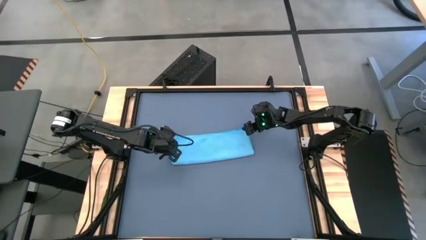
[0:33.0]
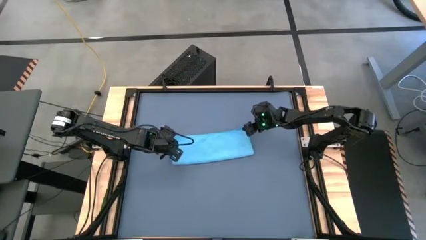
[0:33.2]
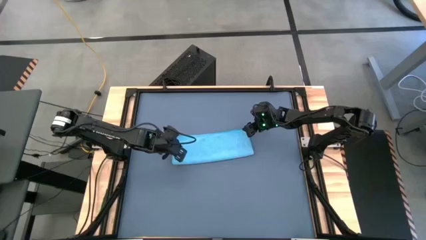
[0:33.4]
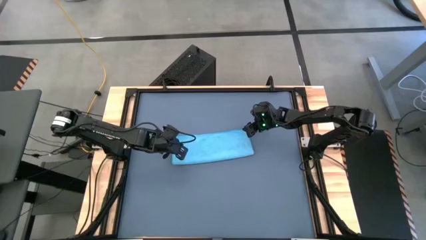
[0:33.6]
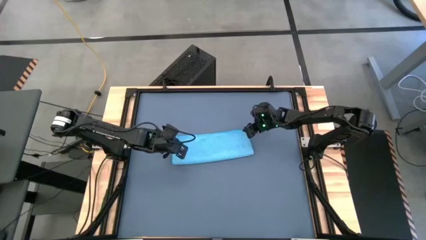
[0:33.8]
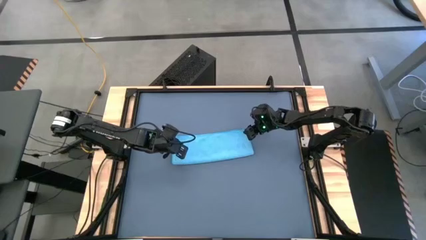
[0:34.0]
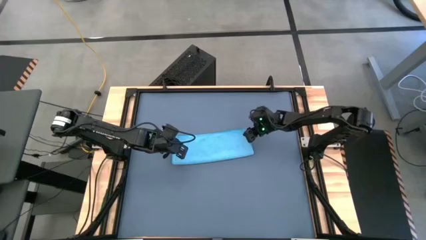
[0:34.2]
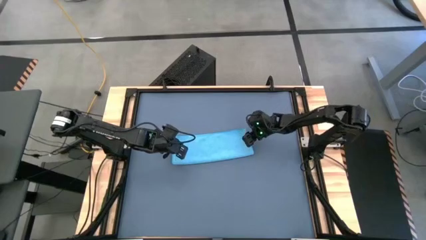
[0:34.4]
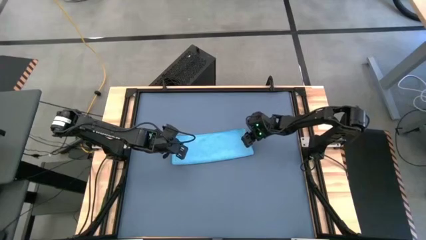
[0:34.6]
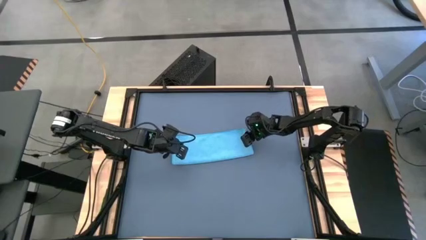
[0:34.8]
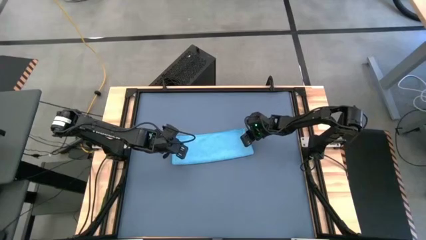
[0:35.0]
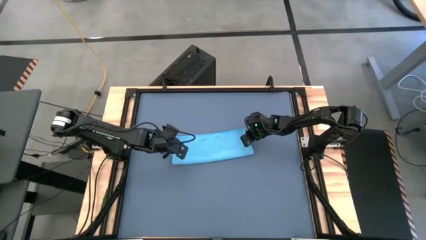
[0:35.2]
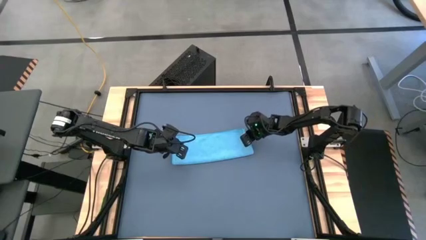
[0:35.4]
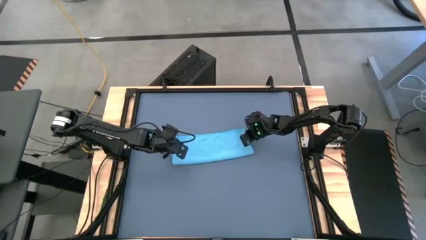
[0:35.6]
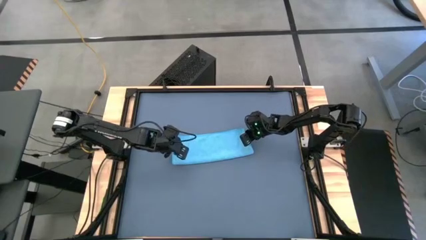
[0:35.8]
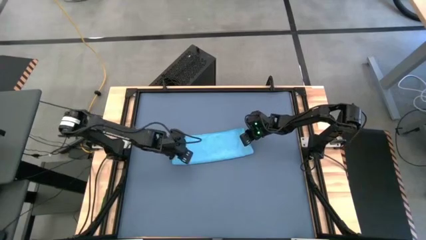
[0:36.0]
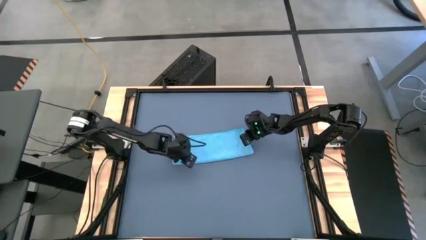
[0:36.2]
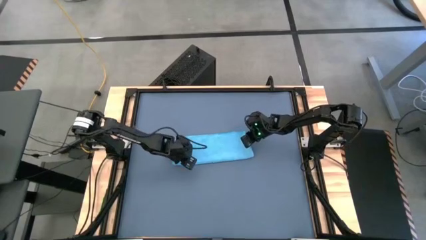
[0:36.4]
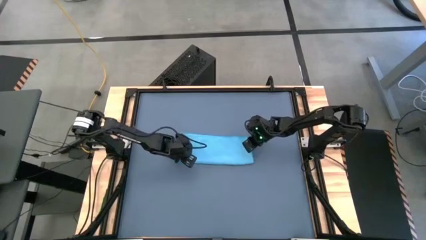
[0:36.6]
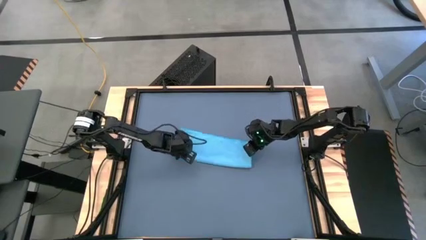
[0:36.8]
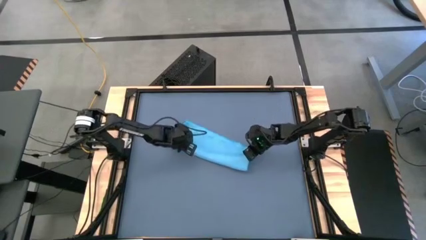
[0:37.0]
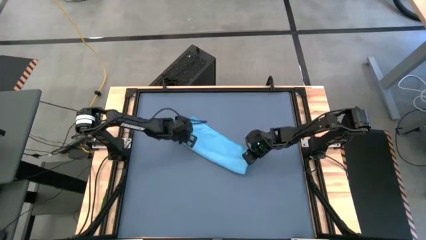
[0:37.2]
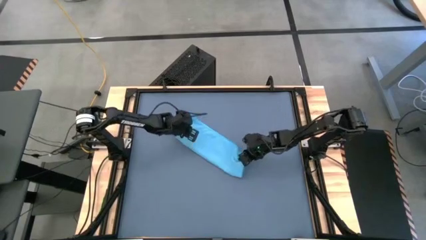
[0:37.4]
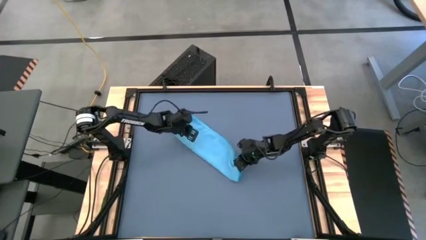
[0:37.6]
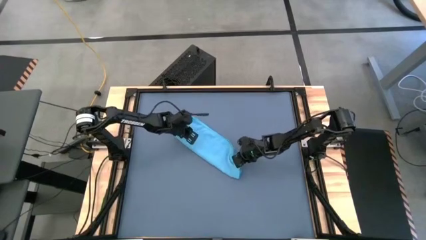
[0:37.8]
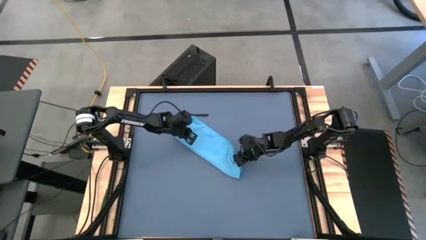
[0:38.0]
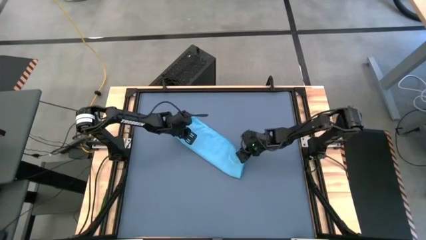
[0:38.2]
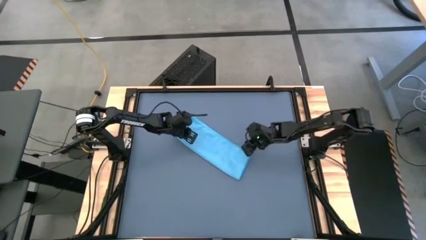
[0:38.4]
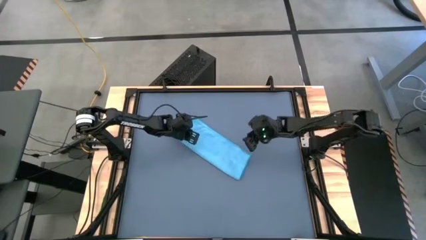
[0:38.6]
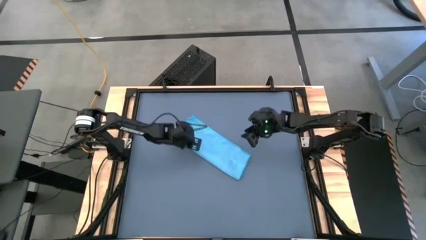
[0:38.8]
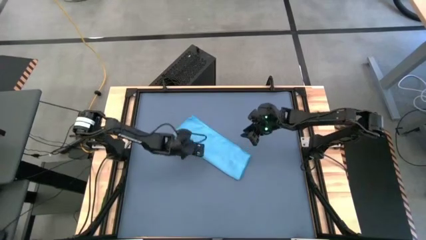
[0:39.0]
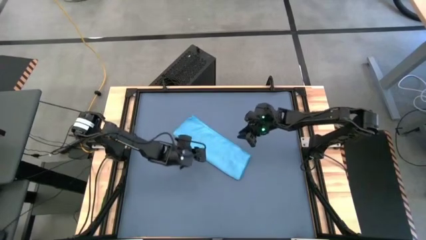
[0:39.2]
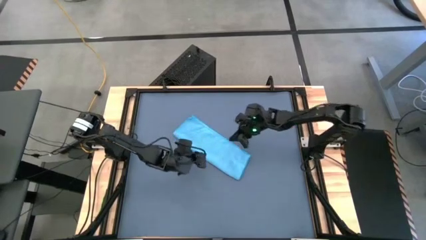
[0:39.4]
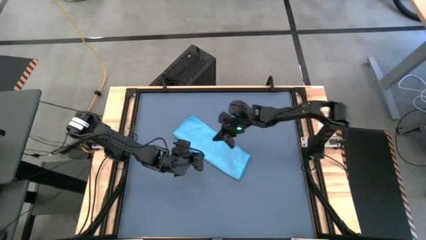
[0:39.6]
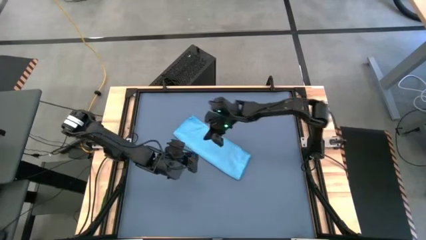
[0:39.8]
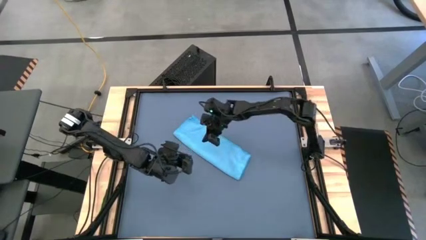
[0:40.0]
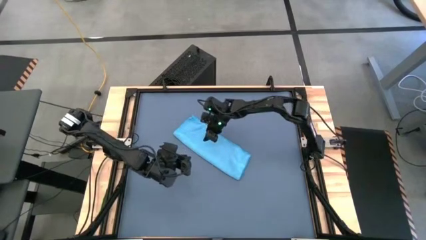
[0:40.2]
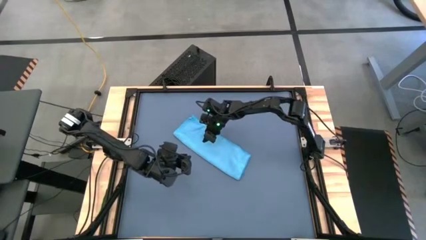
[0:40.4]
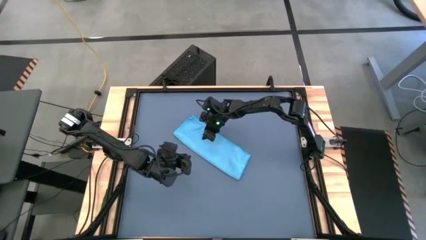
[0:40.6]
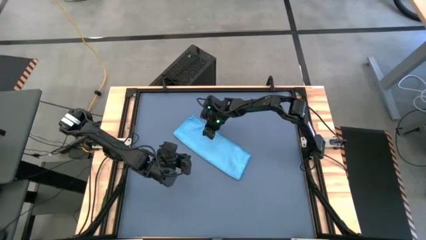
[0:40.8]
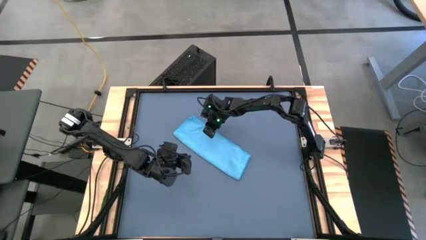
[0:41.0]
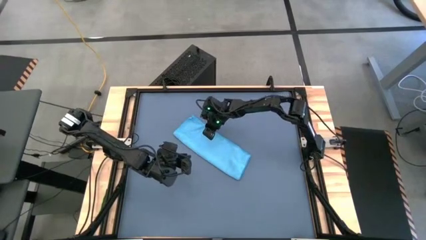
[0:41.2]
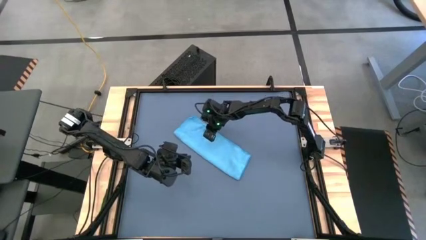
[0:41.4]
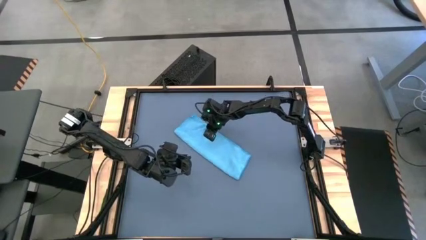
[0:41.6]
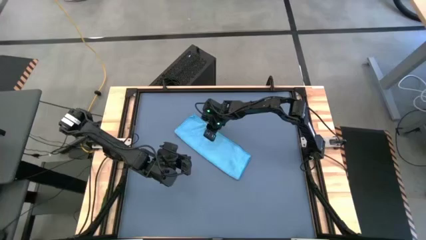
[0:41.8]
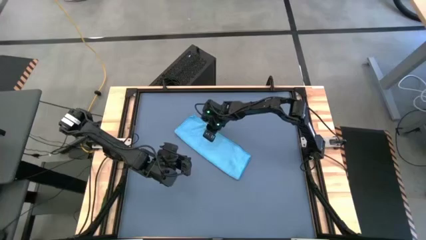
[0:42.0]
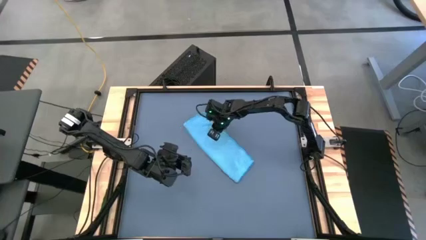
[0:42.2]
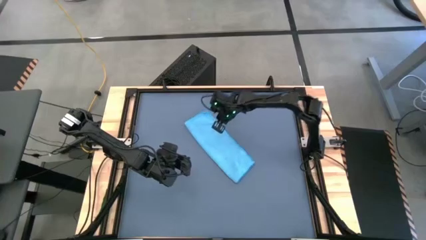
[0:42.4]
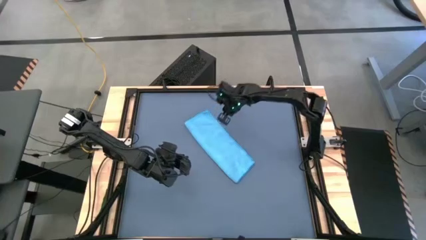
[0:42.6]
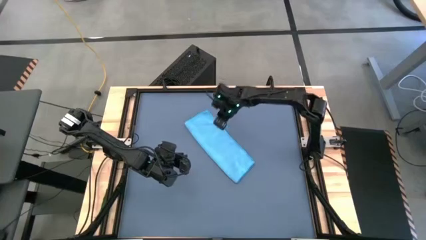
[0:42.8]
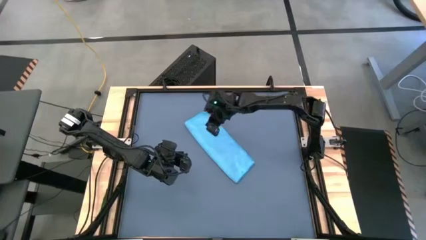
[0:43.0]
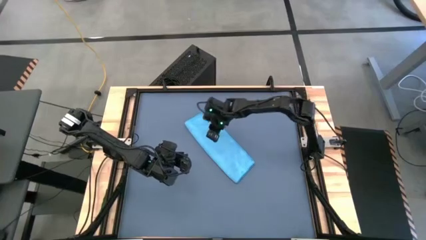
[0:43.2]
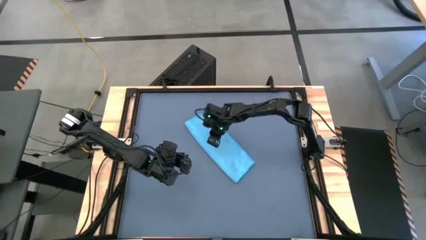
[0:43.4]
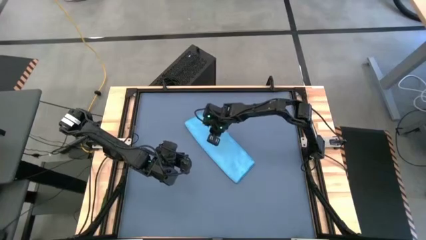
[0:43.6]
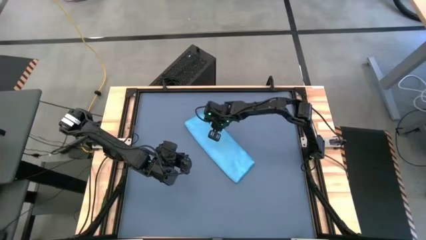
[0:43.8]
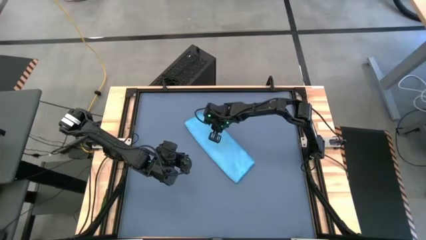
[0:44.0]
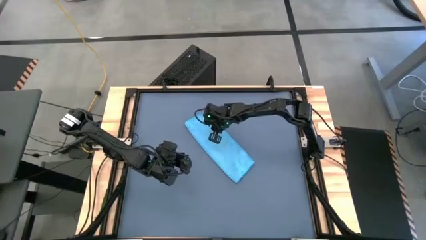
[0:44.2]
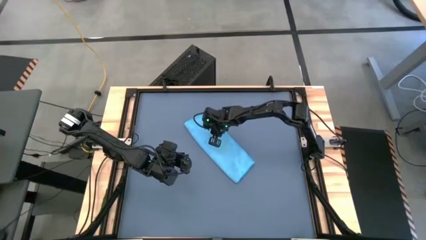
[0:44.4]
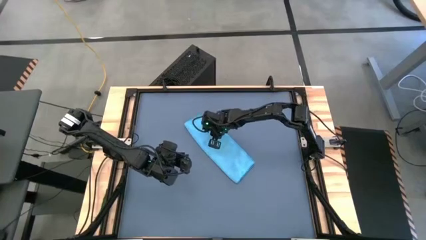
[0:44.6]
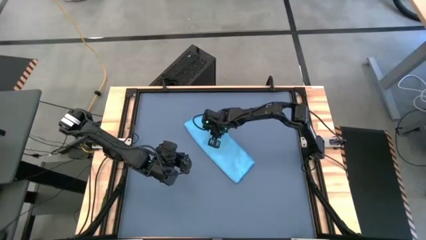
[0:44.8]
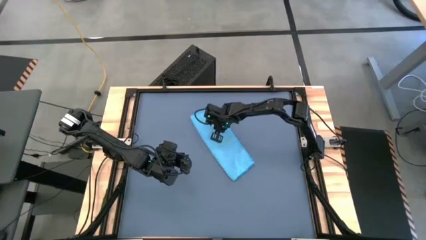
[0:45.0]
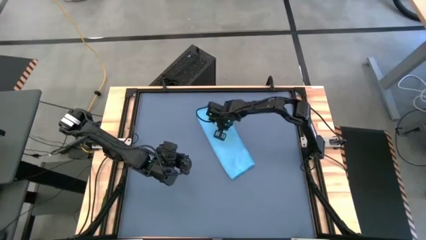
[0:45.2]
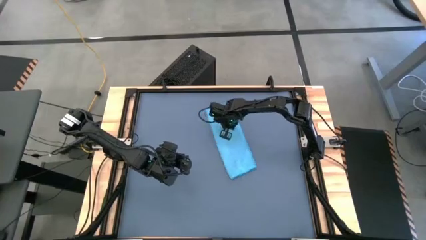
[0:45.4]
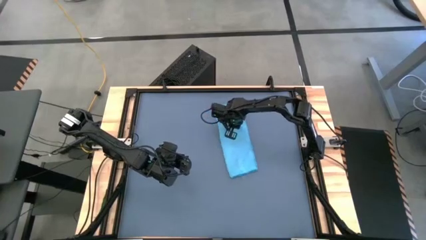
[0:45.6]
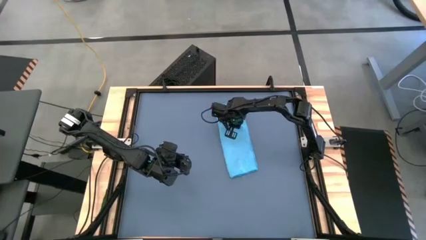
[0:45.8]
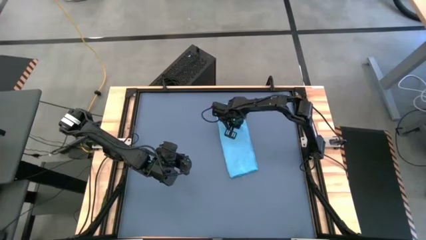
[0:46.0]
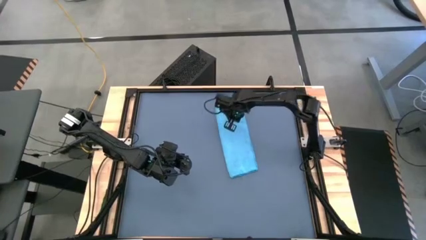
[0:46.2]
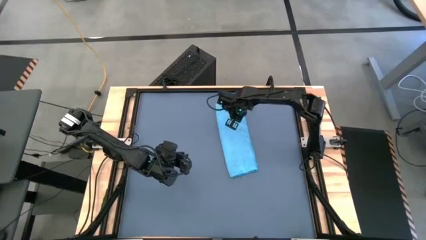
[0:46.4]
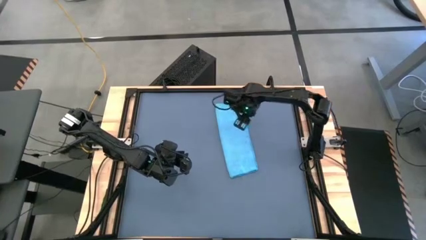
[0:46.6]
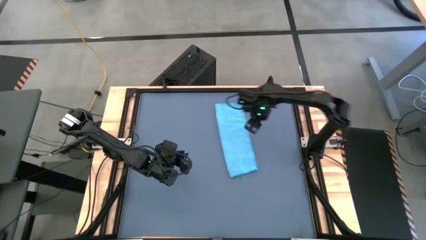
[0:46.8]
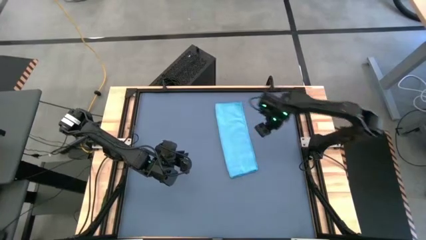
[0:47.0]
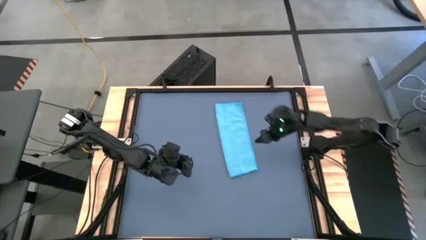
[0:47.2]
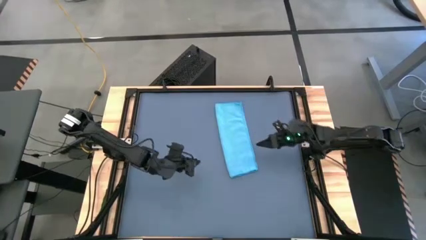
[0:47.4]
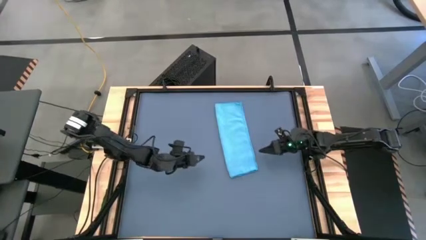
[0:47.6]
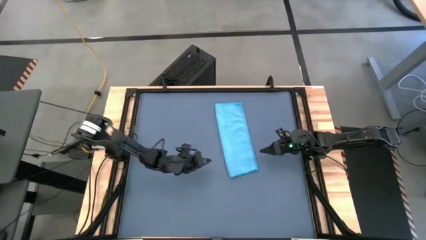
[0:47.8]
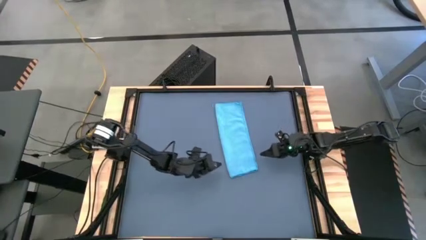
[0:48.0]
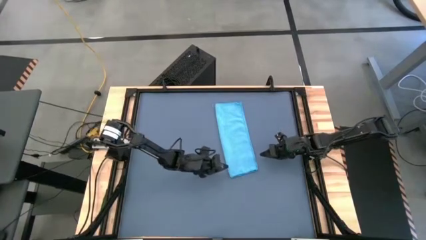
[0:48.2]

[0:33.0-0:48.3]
Task: Roll towel
Roll the blue microfiber towel
